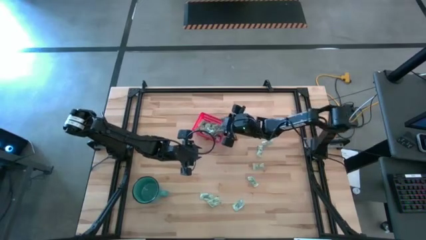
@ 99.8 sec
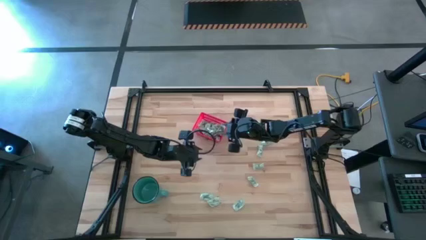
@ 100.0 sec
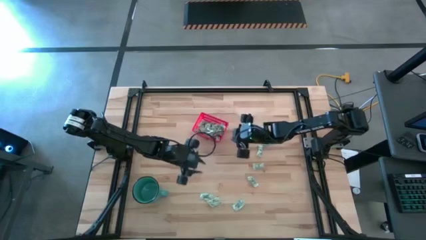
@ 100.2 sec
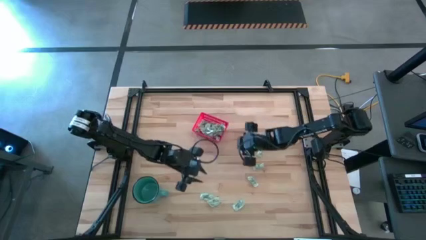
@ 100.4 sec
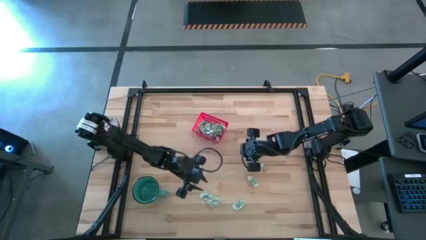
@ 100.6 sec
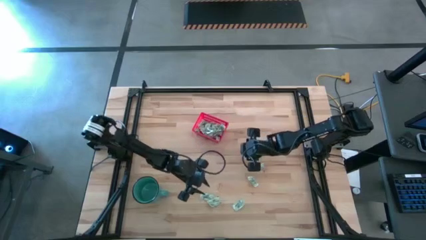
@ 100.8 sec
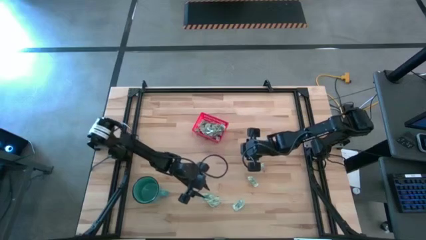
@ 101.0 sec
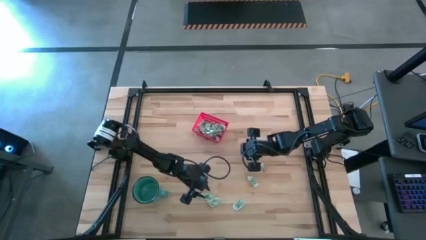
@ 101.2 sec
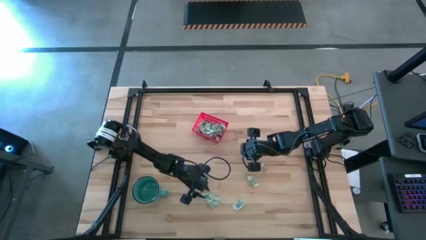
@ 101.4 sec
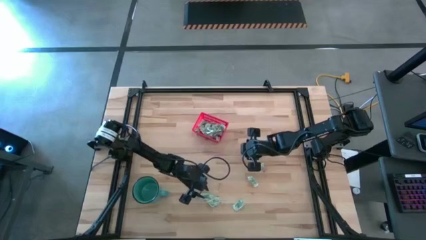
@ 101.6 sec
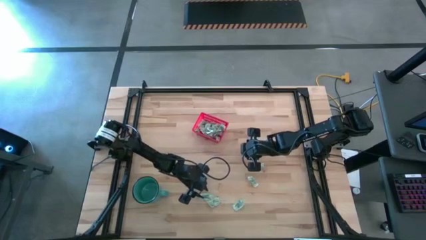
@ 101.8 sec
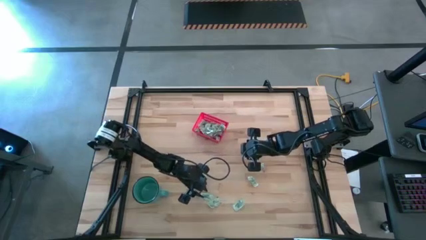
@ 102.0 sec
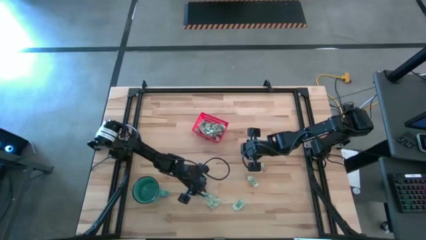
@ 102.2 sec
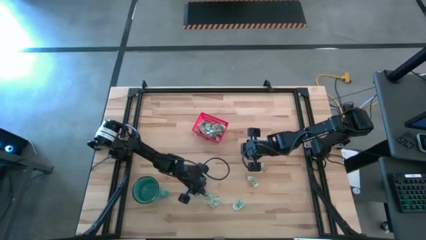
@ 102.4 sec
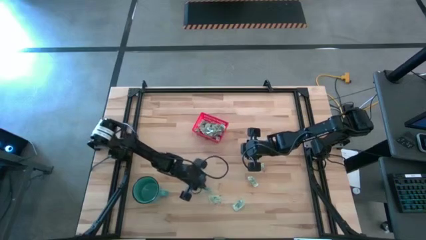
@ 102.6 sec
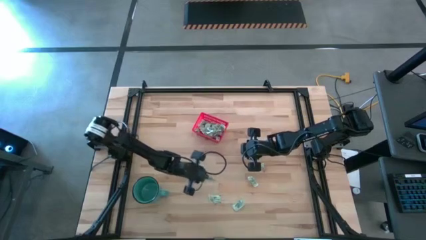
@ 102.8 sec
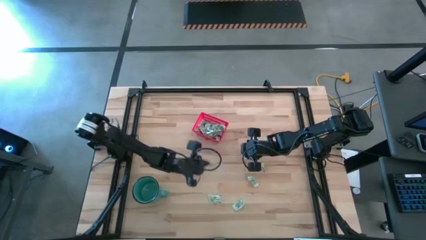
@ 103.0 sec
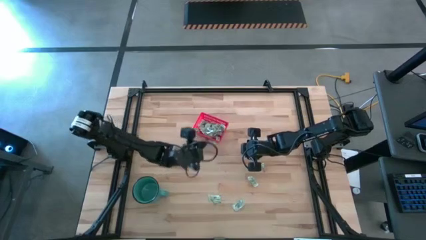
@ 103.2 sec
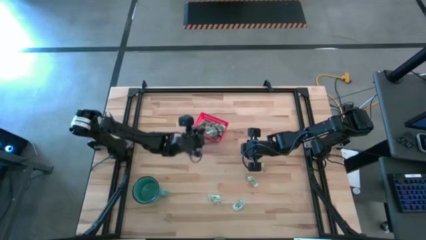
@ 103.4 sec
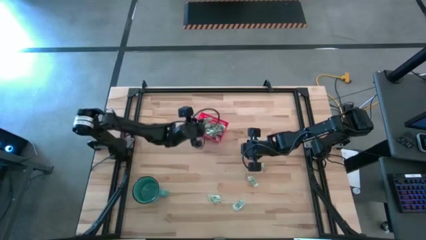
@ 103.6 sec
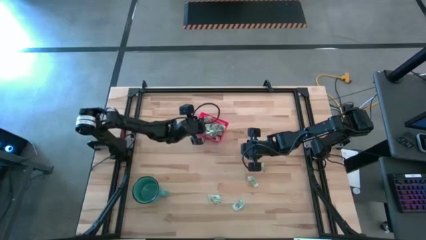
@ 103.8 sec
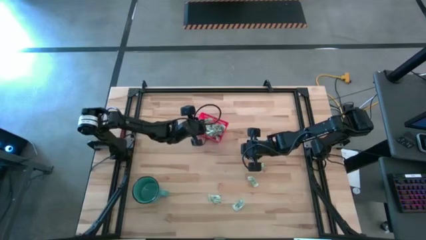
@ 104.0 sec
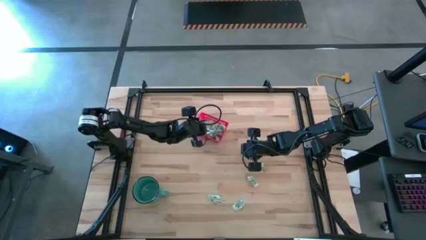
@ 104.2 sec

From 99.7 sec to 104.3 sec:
Task: Pick and place items into bin
Put the stevia packet into the red bin

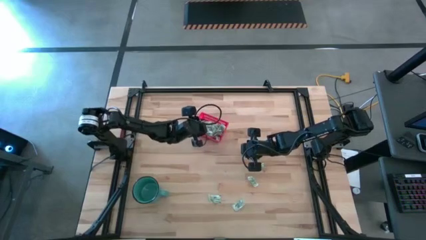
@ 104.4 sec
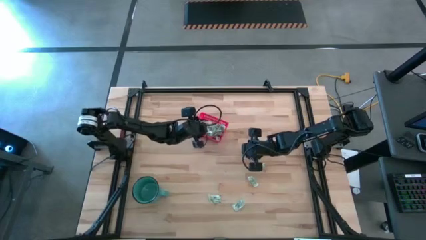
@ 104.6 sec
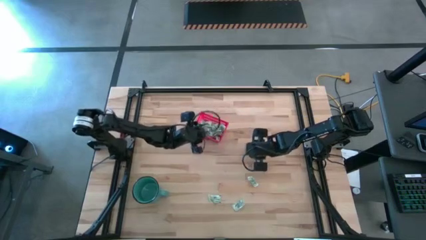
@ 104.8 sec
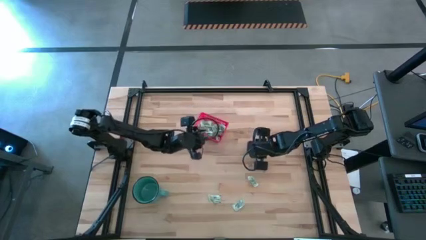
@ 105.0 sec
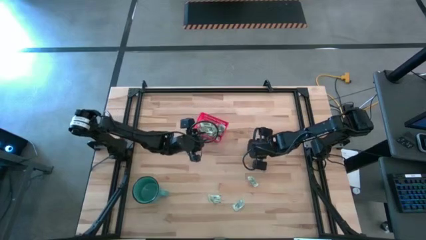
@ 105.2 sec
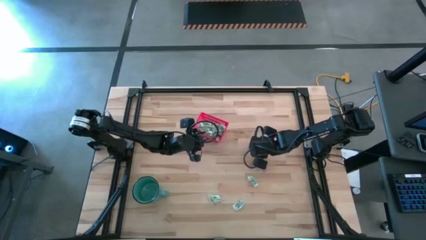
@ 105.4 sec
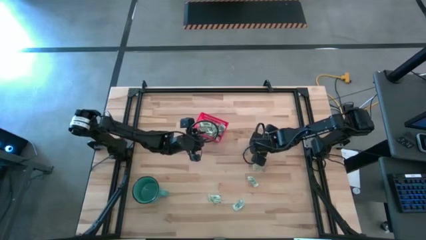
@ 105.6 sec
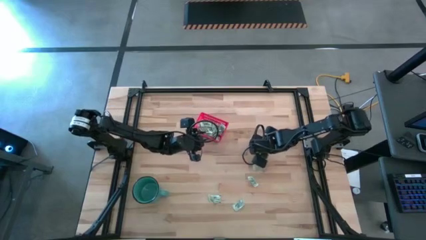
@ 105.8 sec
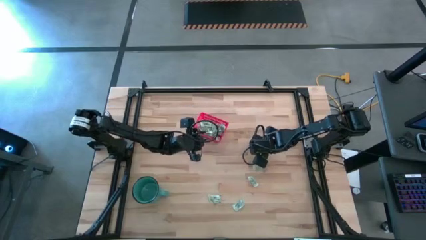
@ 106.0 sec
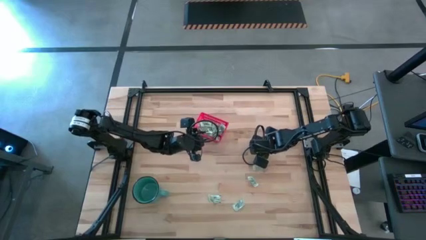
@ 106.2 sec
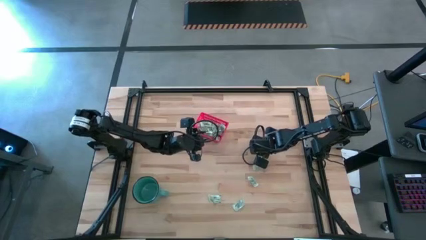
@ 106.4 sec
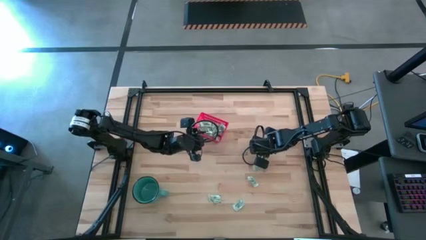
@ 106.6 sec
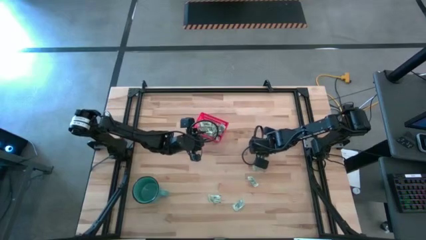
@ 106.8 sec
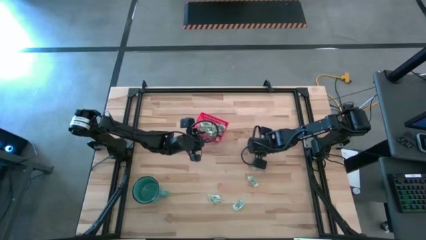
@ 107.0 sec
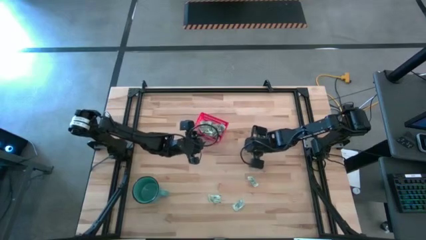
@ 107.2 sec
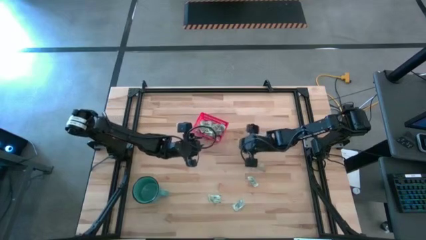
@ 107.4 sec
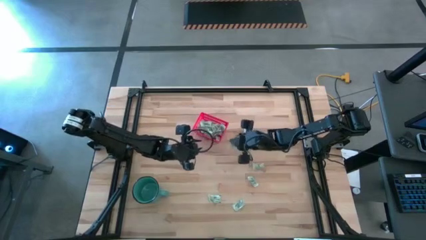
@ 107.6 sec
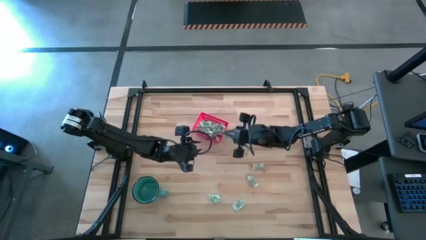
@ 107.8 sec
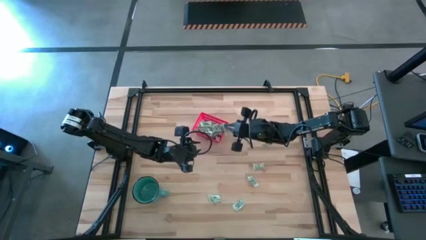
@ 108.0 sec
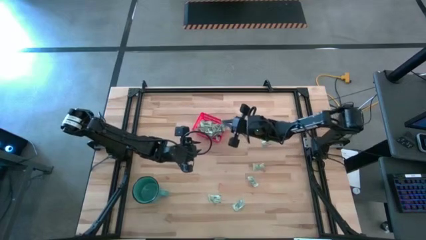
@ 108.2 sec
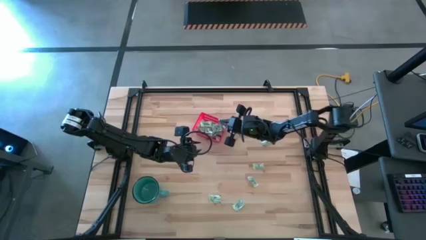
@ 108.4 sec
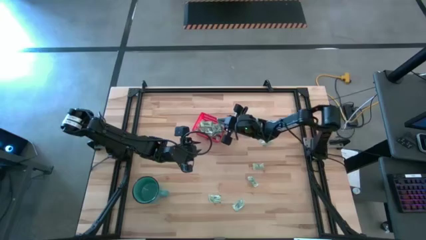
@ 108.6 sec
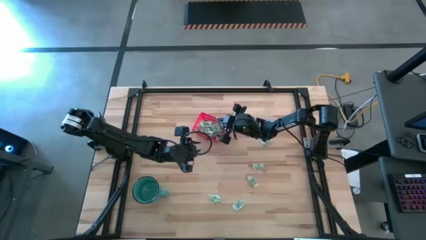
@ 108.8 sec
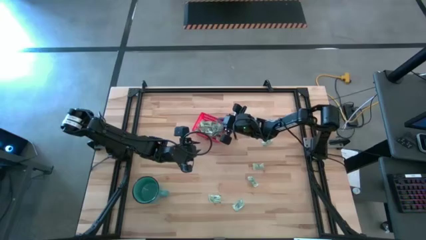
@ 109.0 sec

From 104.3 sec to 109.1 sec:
Put the stevia packet into the red bin

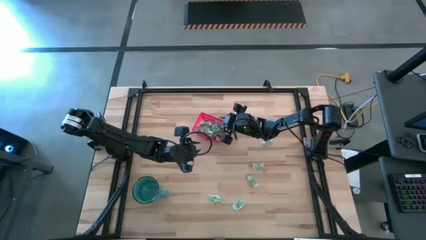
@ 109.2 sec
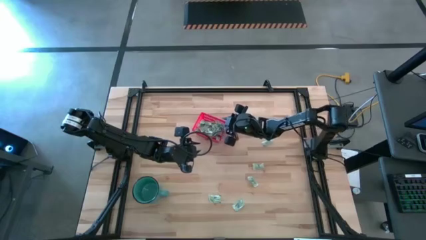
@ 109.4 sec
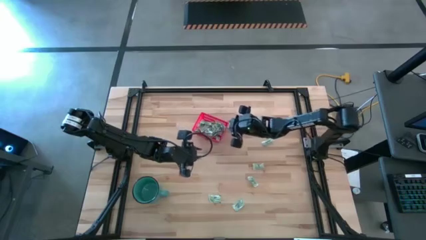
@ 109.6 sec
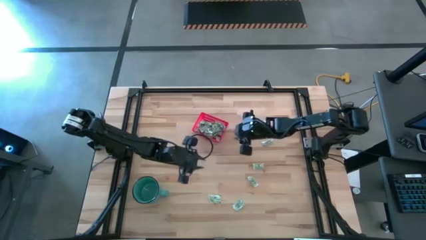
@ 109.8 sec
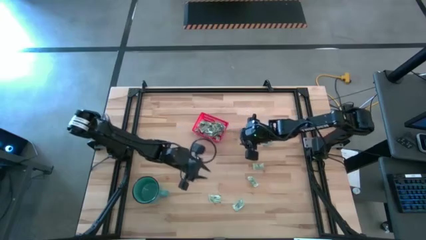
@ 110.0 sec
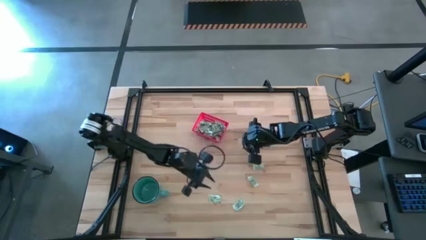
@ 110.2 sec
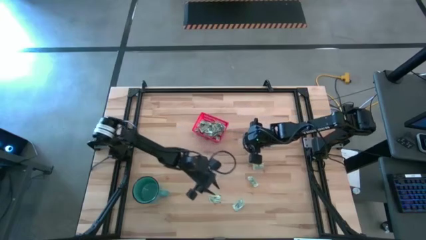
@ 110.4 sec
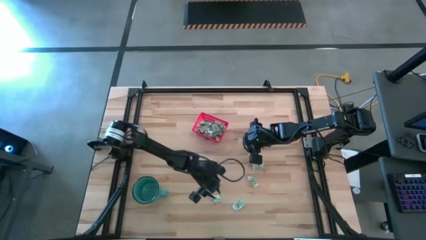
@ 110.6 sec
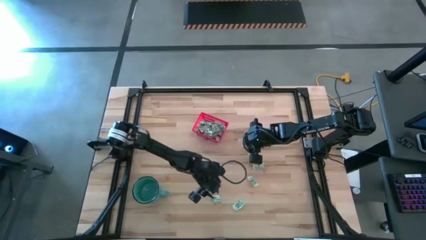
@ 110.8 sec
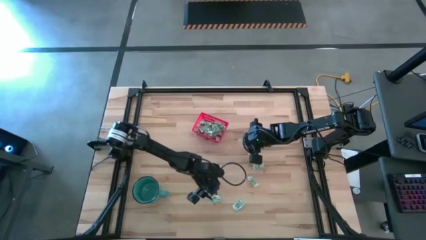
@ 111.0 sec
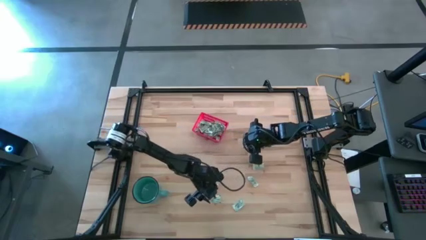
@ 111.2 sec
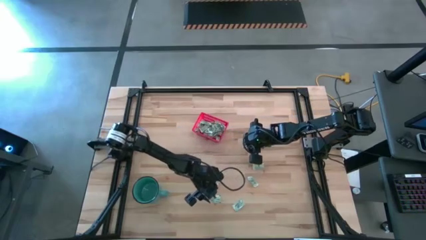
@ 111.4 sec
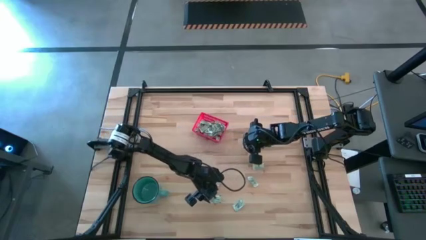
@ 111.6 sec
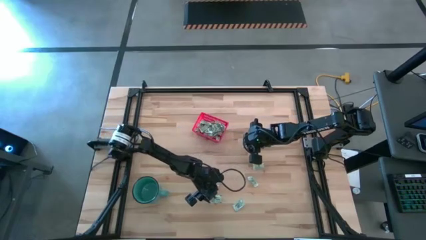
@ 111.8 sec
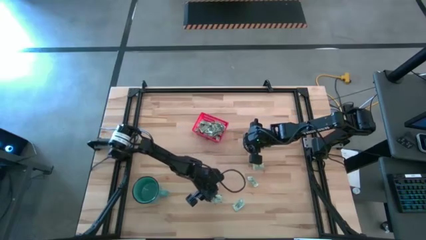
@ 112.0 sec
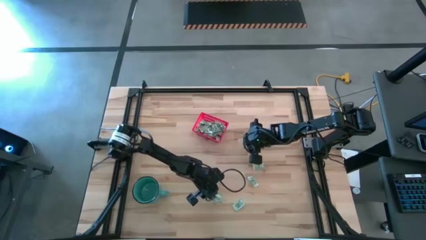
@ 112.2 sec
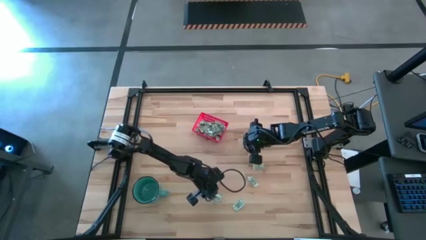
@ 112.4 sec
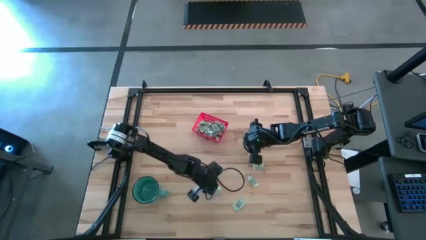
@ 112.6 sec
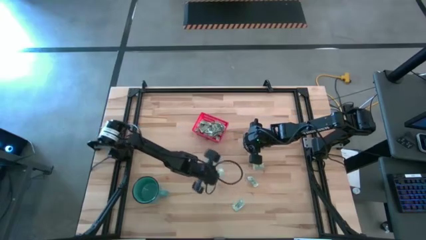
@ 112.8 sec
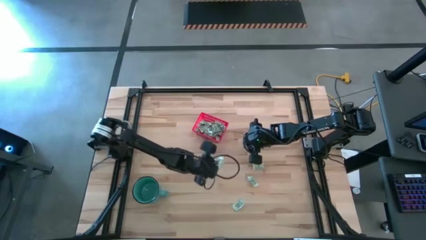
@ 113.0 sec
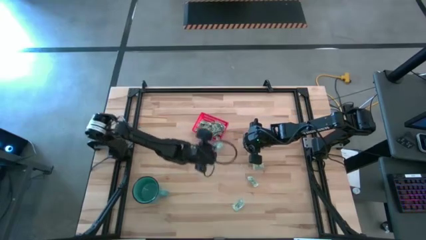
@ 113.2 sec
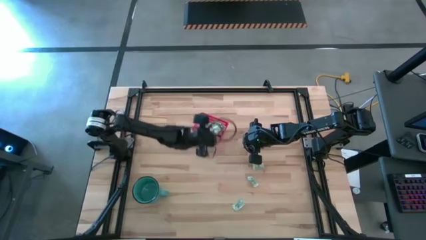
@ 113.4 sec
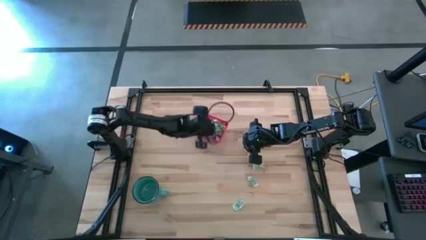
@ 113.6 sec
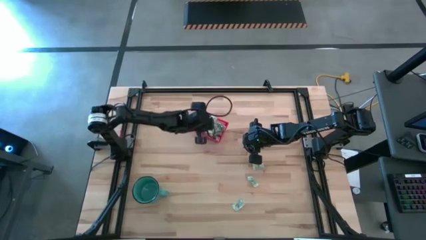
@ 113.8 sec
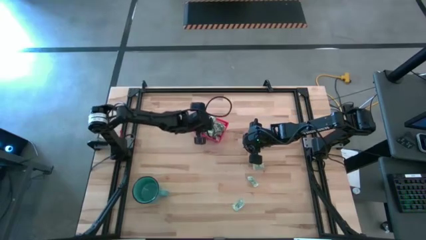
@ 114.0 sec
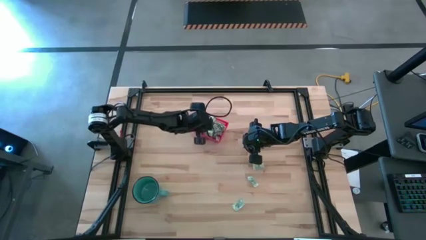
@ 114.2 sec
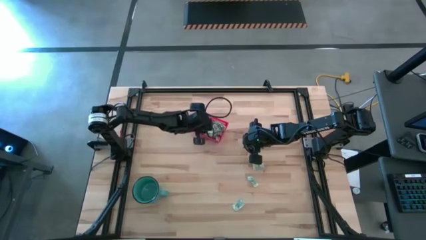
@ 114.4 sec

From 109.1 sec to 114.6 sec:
Put the stevia packet into the red bin

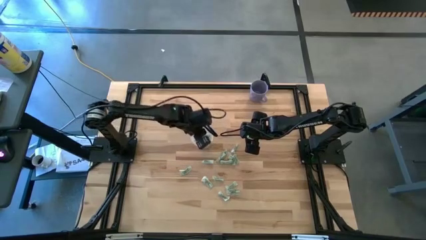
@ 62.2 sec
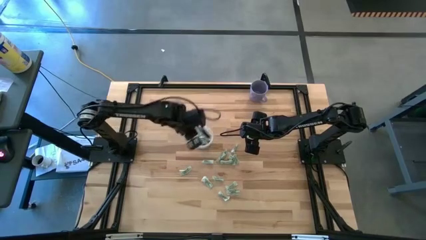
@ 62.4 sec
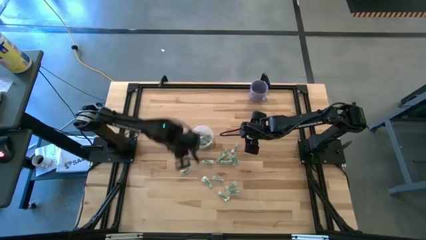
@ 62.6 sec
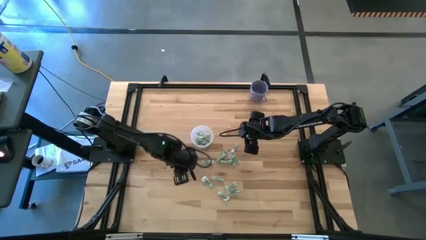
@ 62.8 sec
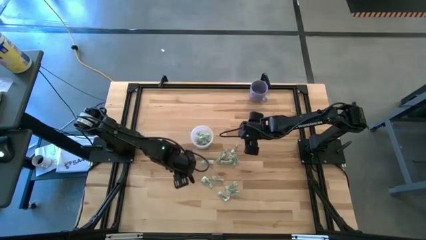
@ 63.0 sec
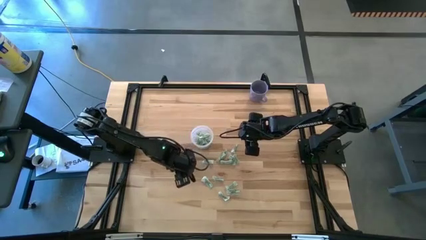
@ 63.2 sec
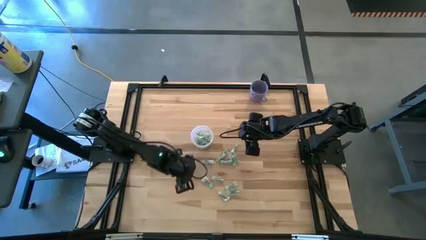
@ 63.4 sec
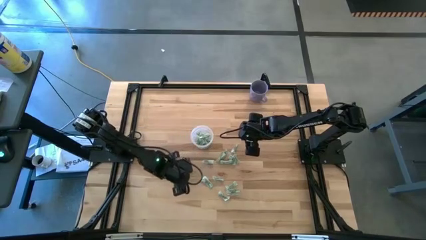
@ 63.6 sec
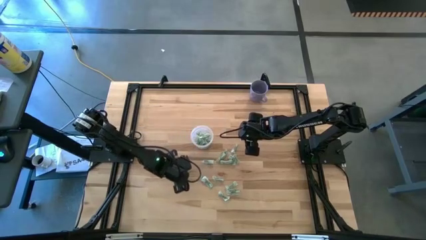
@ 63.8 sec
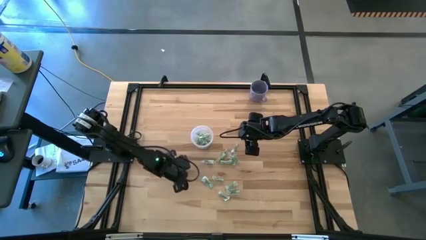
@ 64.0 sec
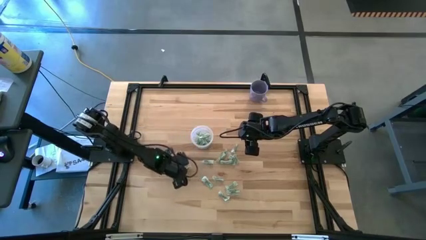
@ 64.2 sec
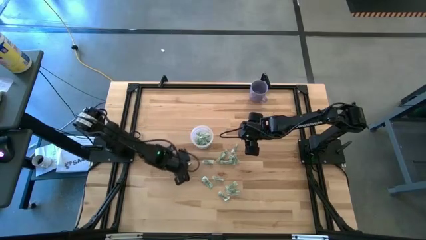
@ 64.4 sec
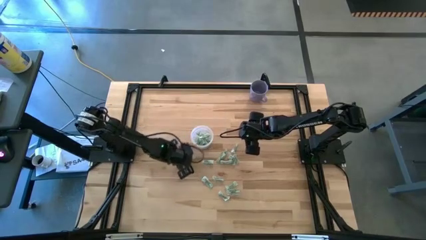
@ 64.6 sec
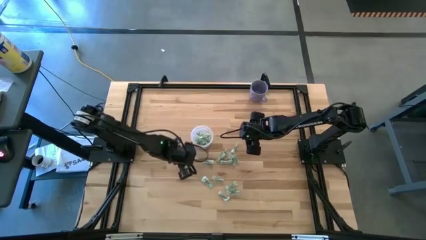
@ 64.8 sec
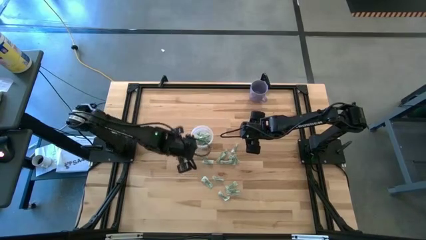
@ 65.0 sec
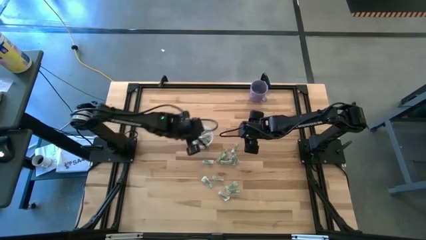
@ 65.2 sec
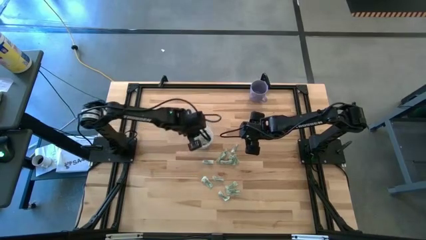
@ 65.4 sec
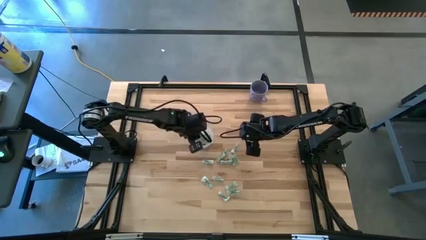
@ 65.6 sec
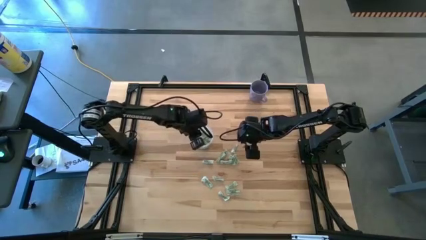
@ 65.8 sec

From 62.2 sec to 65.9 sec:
Task: Pick and place Stevia / Truvia into bins
Put the white stevia packet into the transparent container
